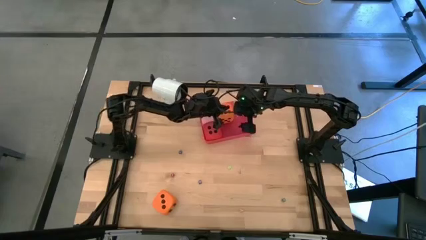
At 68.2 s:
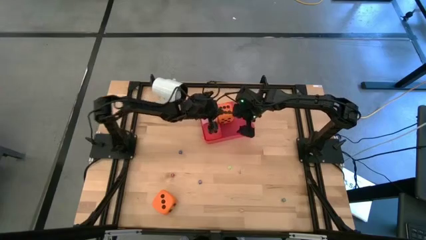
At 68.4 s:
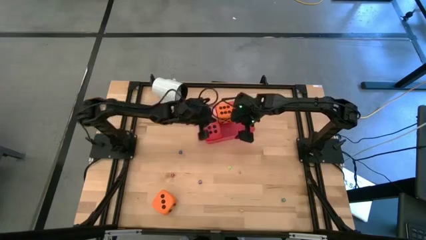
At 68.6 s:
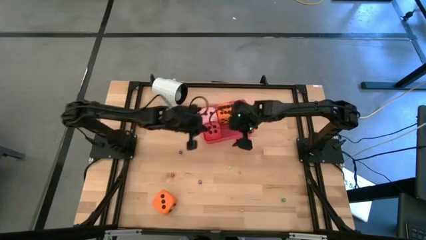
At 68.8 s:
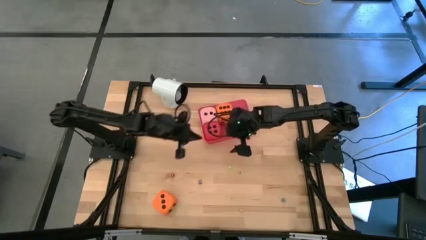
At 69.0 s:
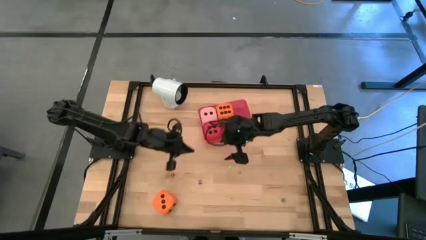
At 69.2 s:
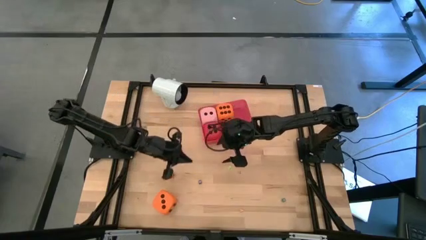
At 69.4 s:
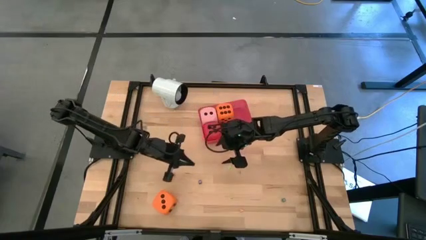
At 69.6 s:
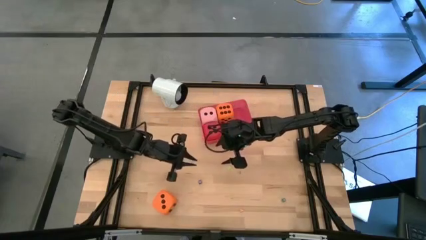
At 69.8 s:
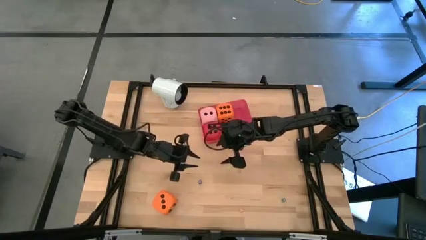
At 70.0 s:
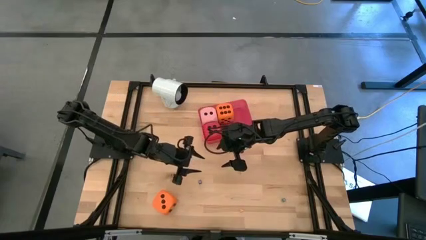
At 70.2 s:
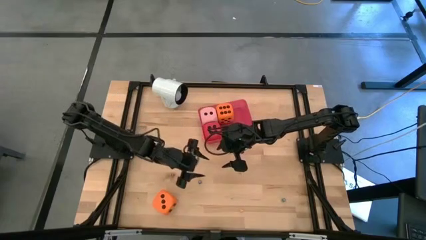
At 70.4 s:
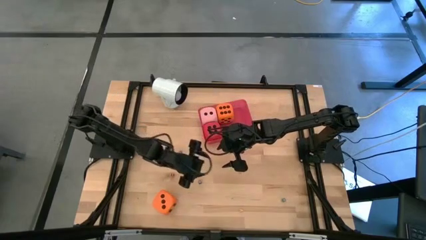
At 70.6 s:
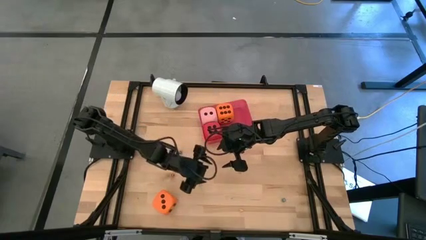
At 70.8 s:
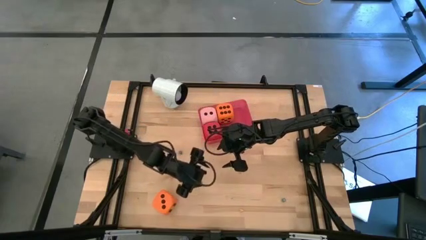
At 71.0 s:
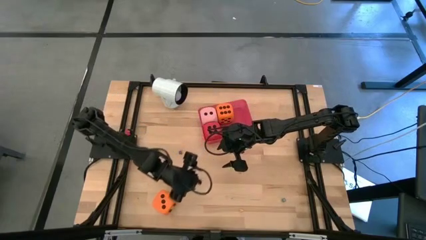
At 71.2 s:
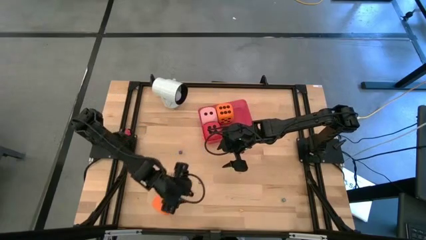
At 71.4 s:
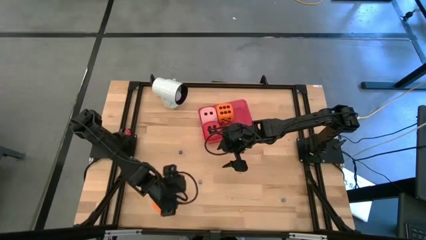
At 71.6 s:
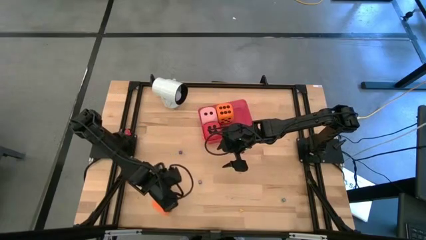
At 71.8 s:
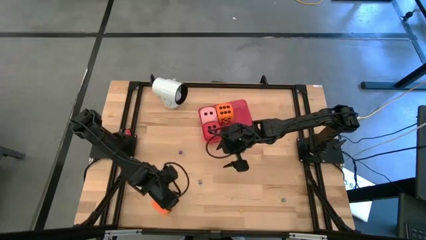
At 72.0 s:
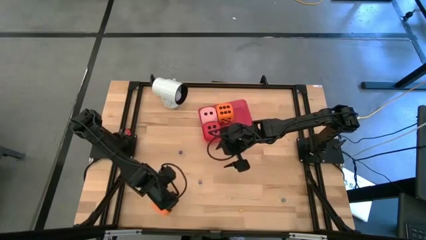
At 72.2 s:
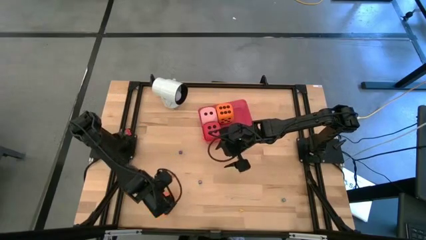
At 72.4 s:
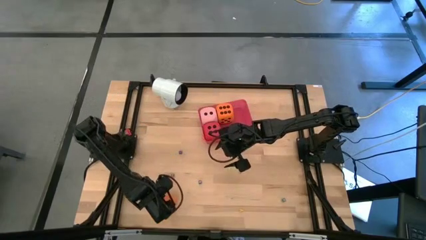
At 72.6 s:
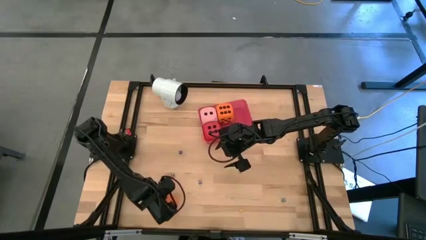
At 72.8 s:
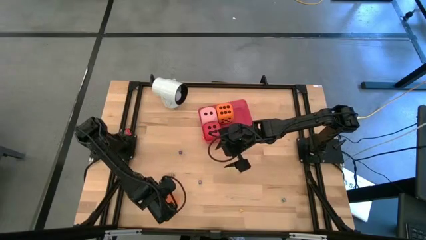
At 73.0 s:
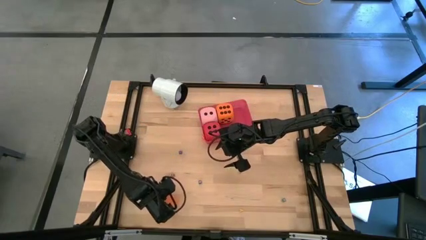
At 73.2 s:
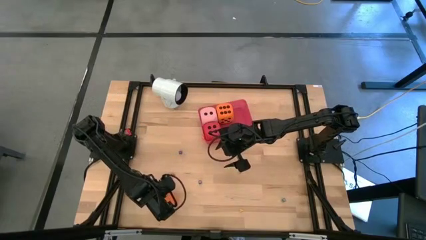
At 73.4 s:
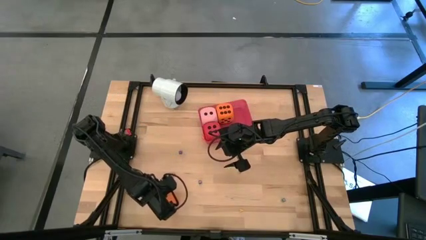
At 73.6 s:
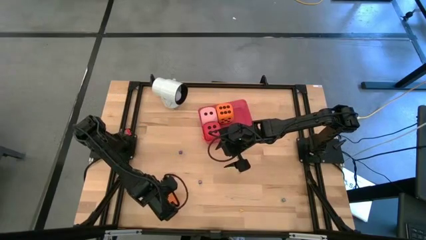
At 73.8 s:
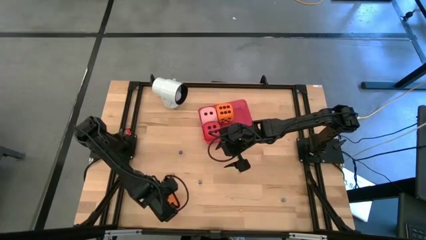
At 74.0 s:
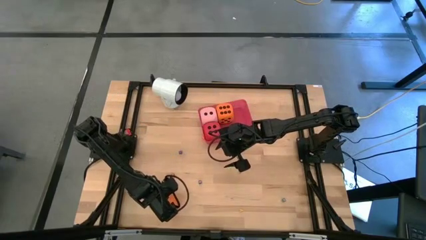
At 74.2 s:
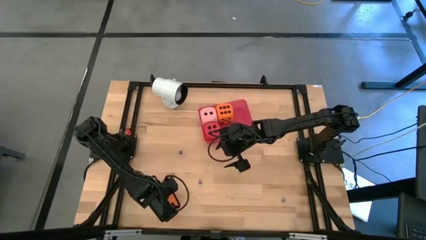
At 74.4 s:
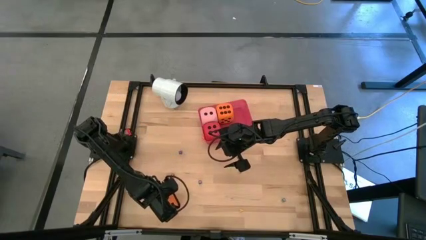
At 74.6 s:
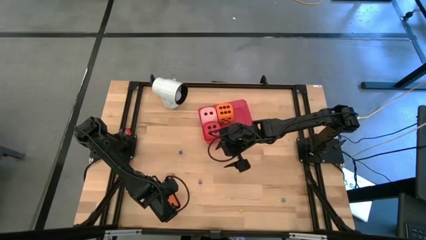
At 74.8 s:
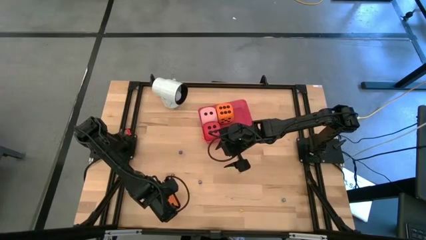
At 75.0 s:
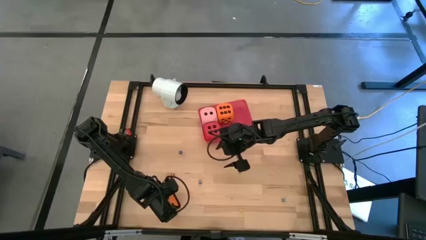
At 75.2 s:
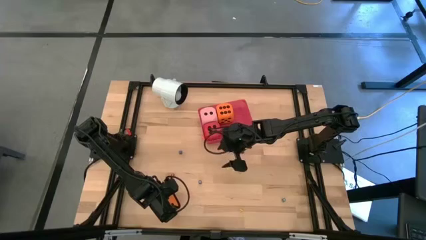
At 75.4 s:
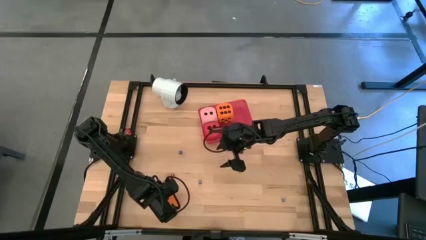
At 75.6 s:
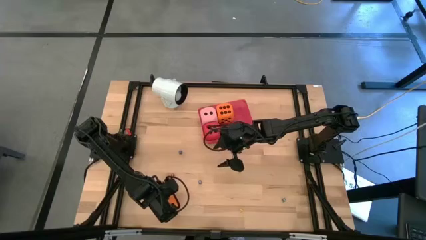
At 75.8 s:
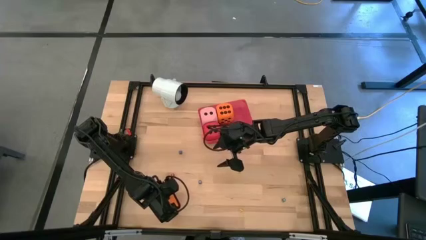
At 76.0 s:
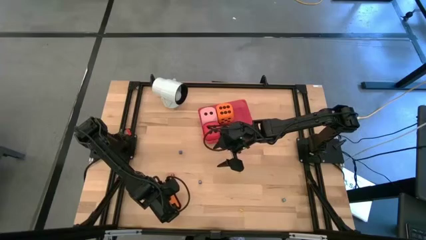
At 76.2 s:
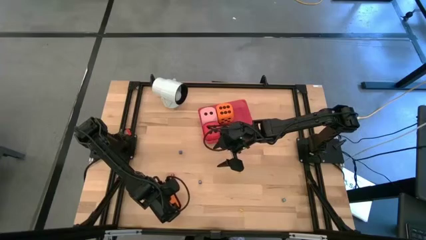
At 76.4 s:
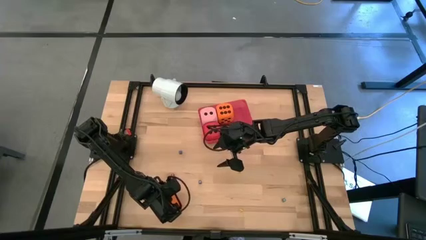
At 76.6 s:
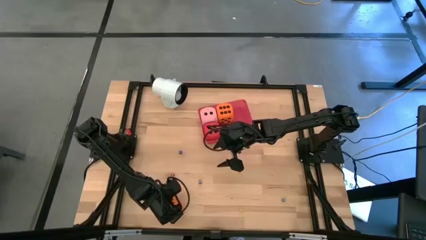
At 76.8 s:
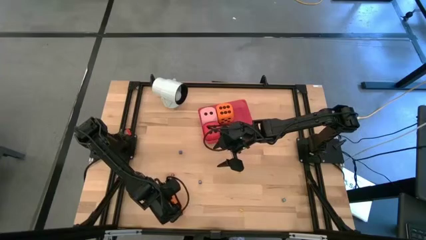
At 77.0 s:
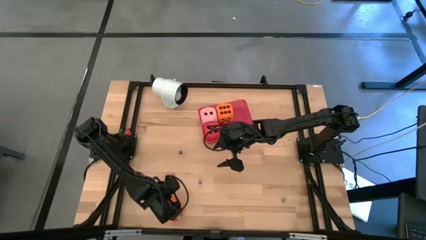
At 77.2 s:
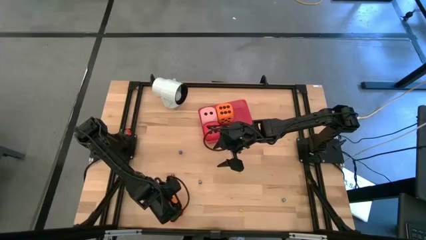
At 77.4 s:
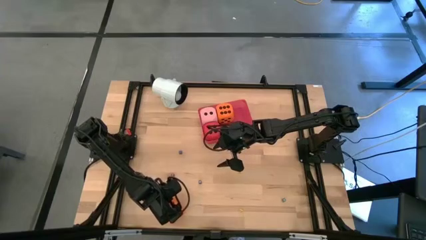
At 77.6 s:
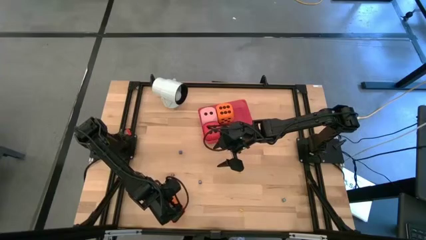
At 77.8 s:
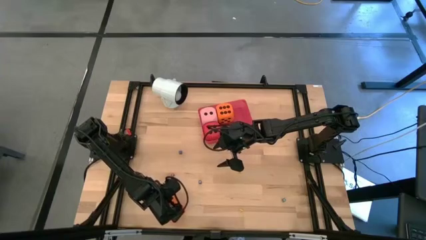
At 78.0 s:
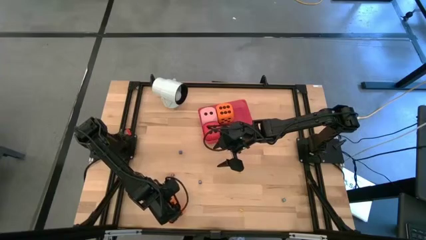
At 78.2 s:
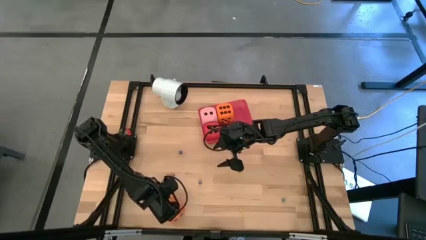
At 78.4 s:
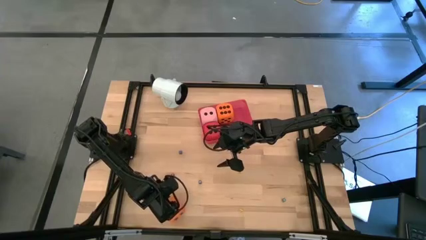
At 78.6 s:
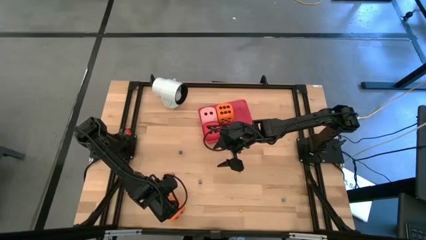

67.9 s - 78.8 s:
Task: Pick & Place Dice
Put the big orange dice into the red bin
